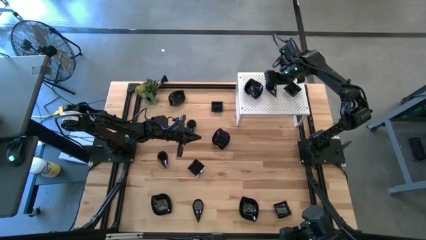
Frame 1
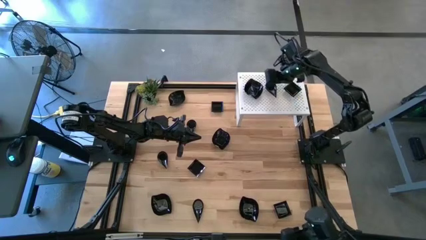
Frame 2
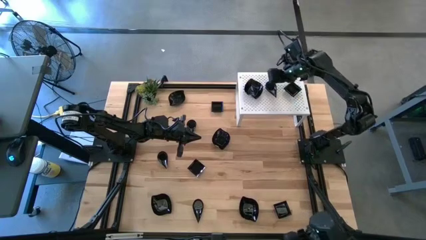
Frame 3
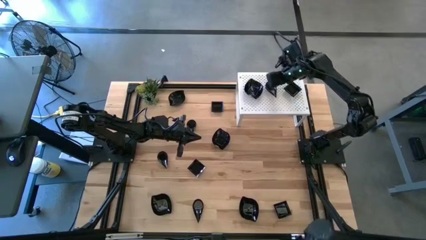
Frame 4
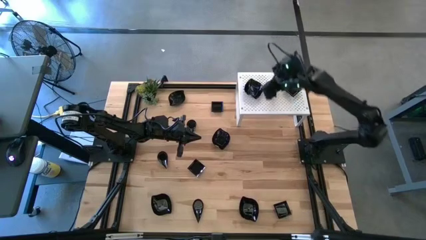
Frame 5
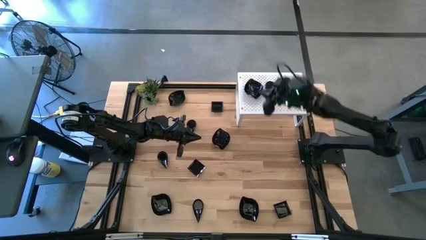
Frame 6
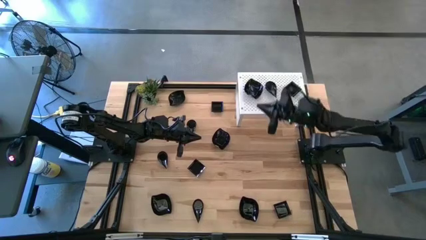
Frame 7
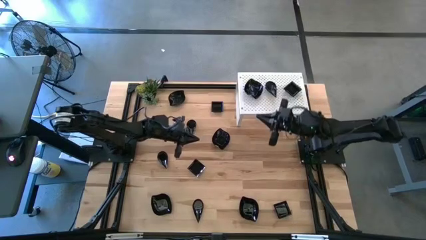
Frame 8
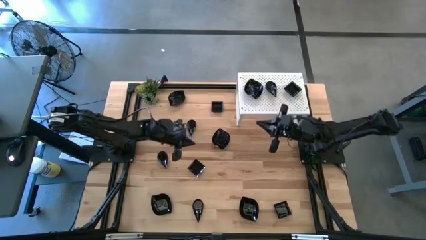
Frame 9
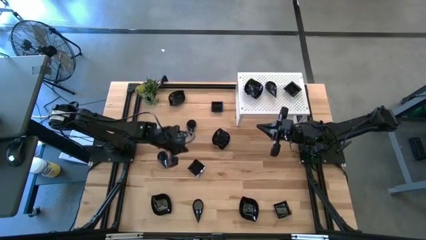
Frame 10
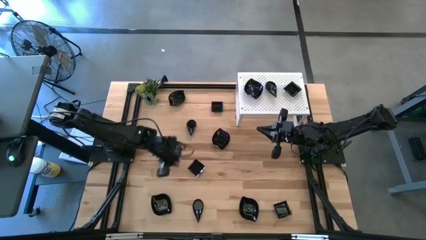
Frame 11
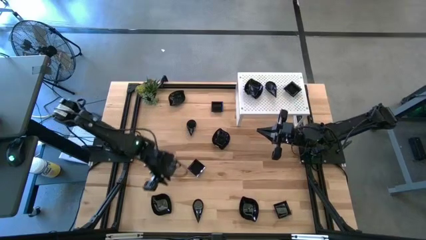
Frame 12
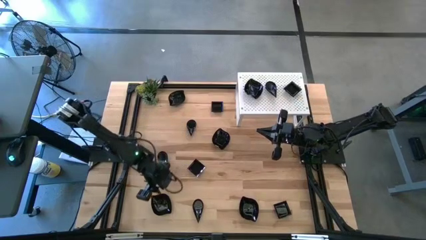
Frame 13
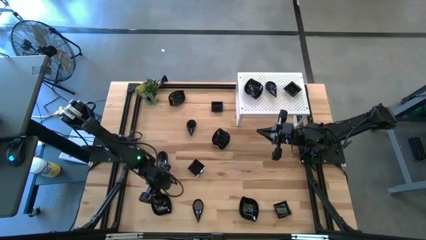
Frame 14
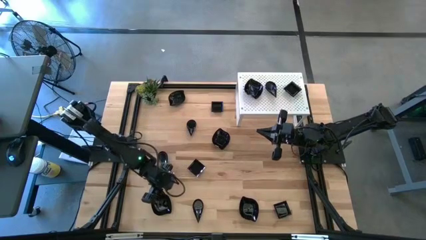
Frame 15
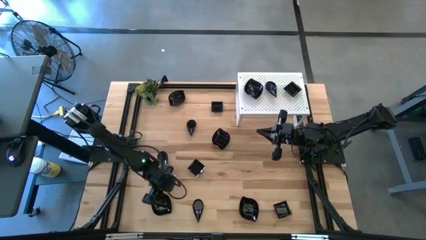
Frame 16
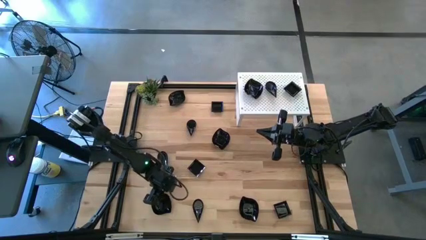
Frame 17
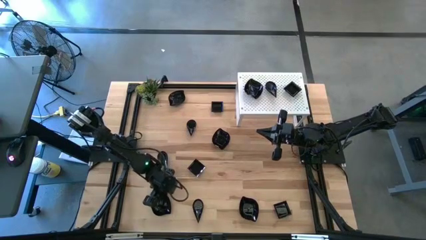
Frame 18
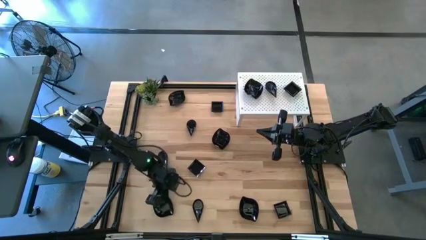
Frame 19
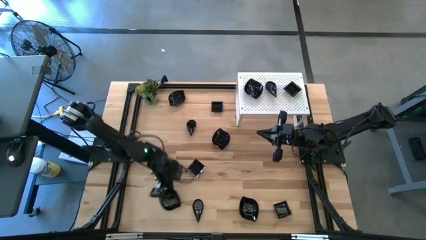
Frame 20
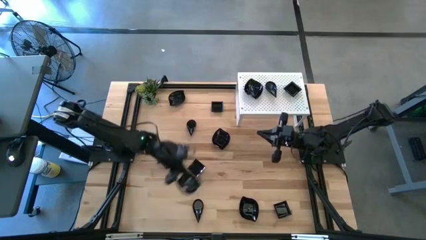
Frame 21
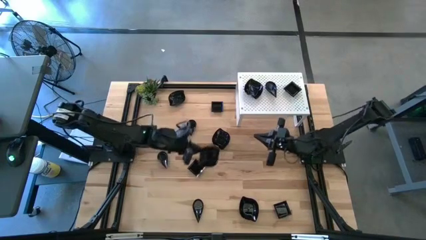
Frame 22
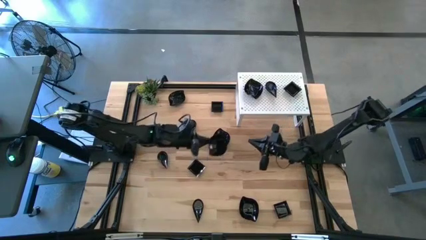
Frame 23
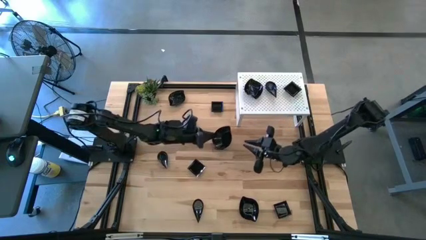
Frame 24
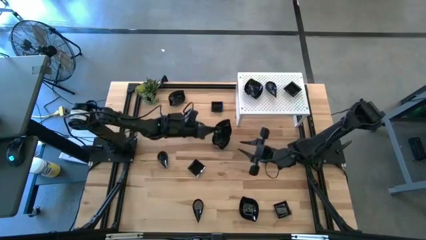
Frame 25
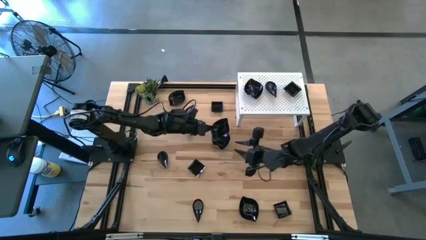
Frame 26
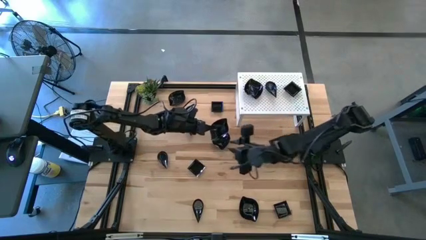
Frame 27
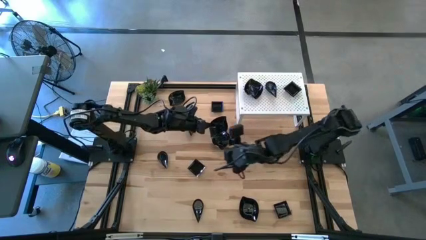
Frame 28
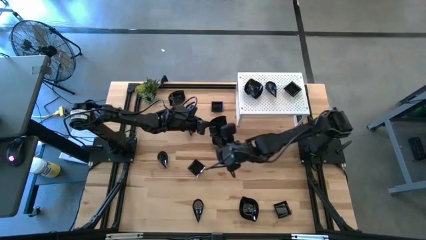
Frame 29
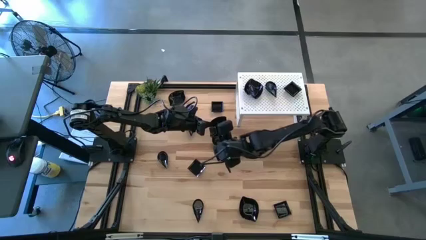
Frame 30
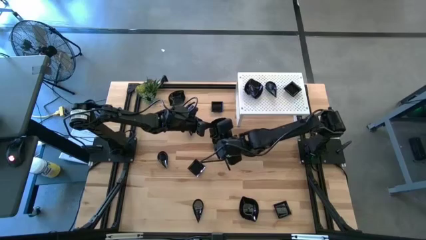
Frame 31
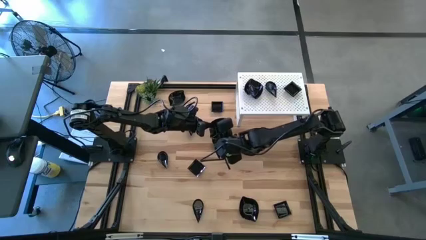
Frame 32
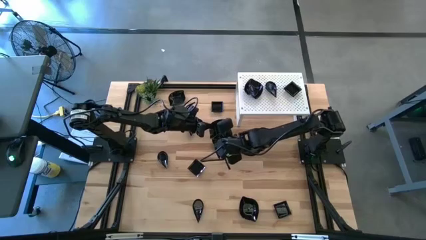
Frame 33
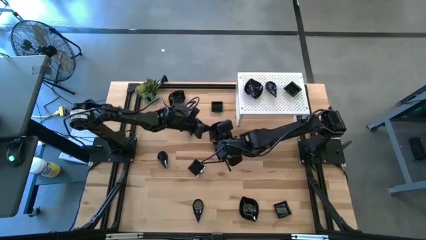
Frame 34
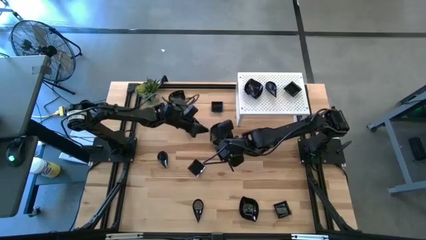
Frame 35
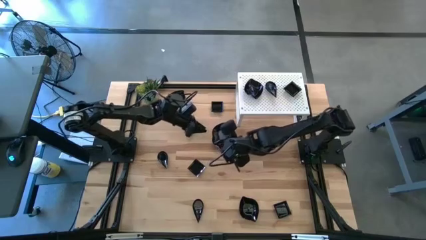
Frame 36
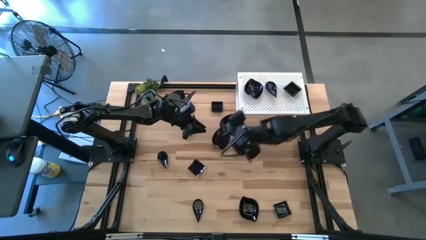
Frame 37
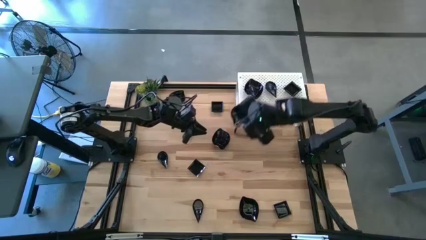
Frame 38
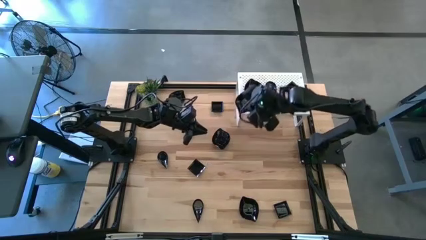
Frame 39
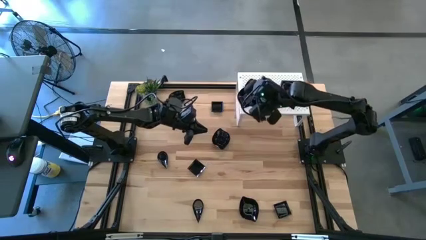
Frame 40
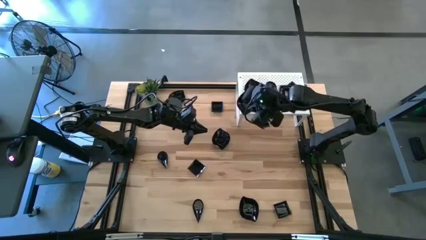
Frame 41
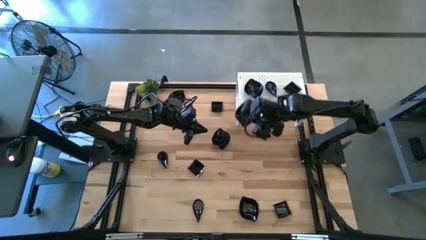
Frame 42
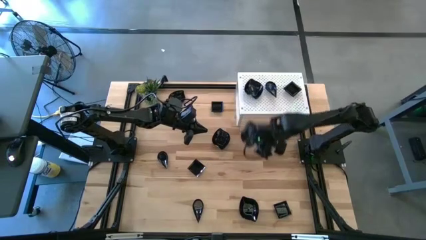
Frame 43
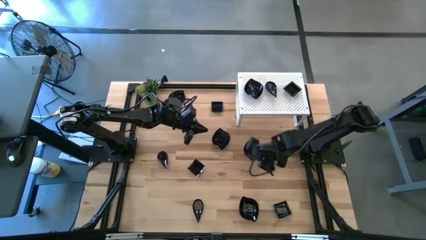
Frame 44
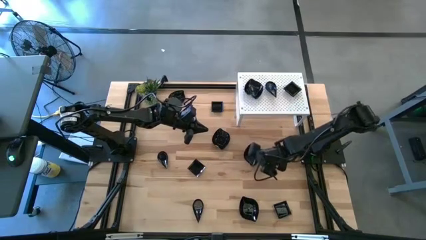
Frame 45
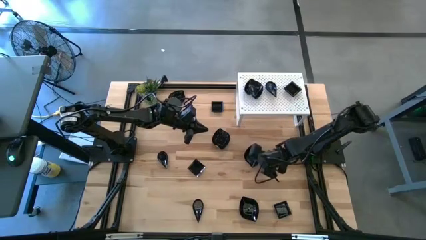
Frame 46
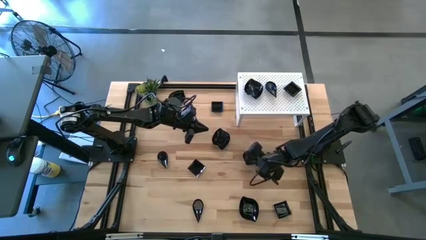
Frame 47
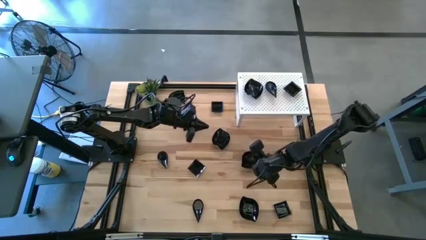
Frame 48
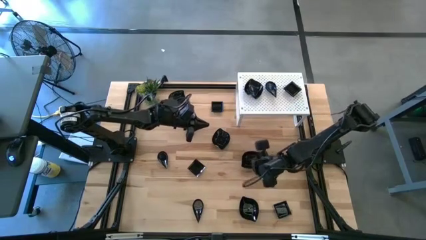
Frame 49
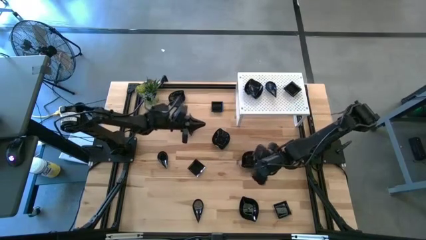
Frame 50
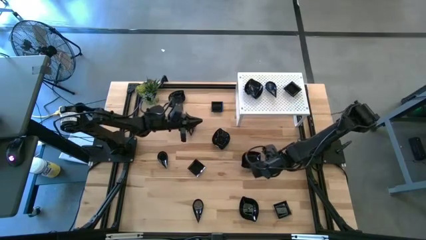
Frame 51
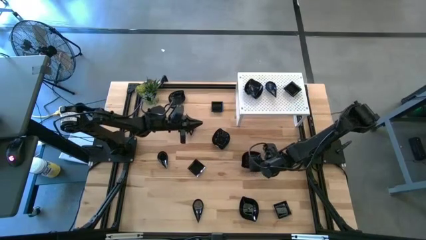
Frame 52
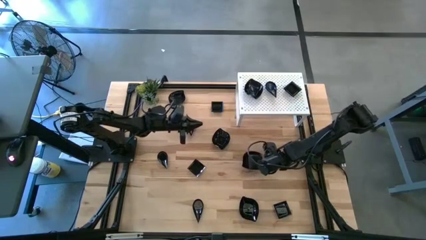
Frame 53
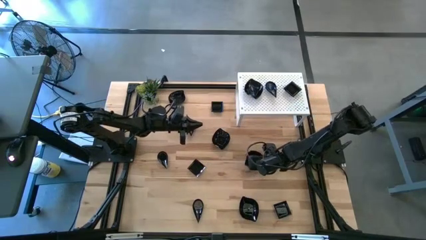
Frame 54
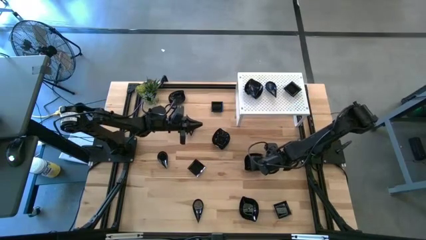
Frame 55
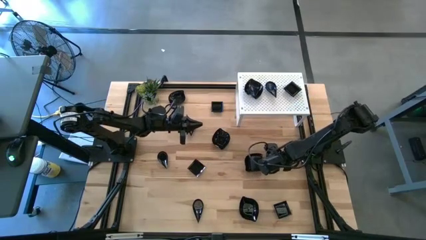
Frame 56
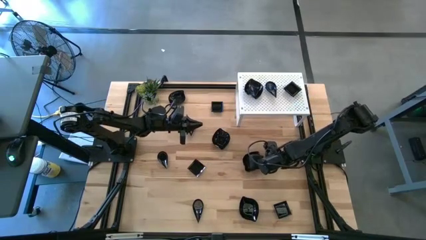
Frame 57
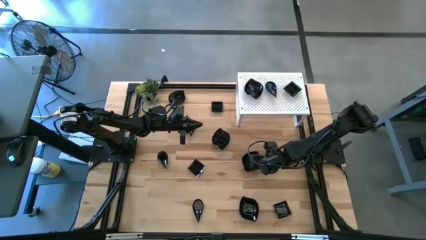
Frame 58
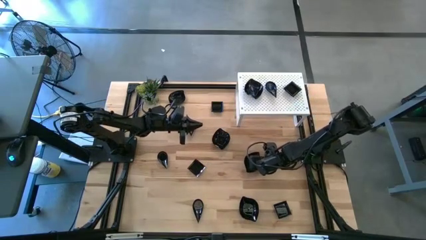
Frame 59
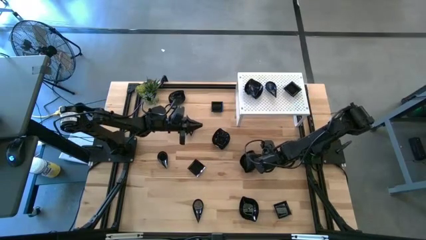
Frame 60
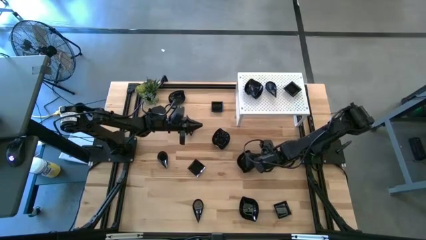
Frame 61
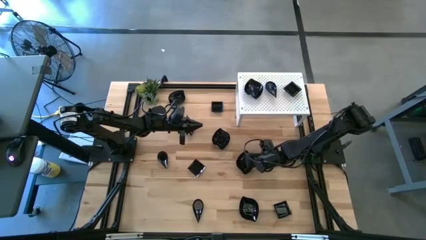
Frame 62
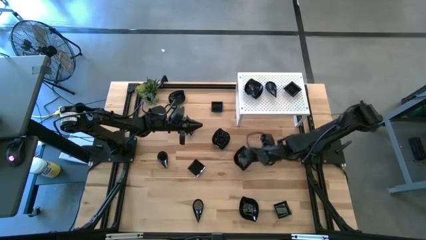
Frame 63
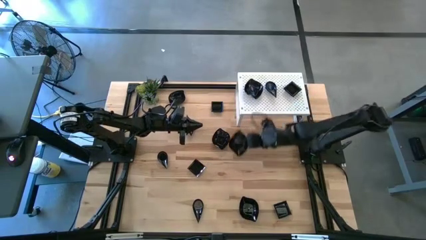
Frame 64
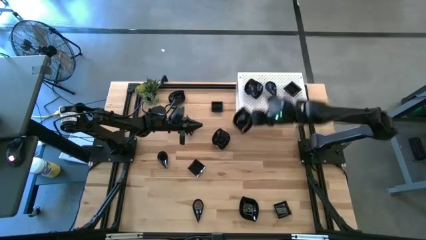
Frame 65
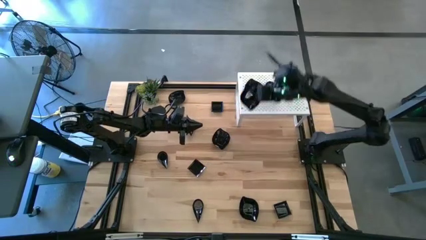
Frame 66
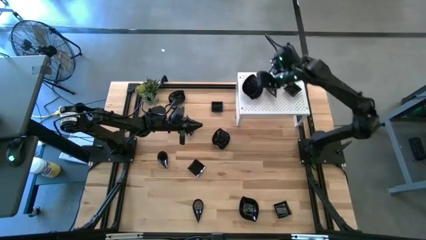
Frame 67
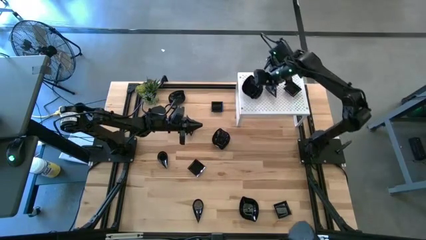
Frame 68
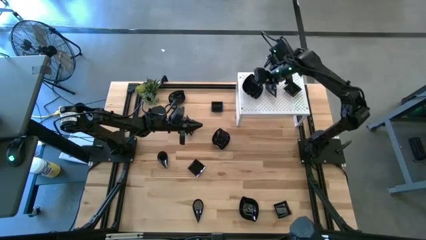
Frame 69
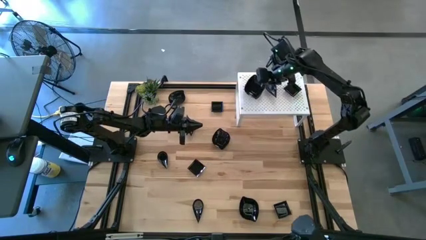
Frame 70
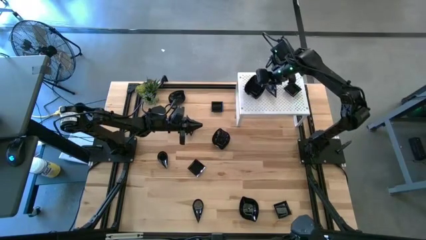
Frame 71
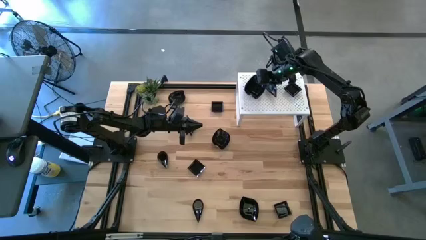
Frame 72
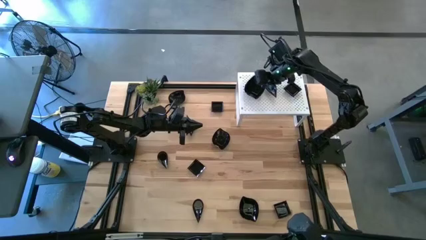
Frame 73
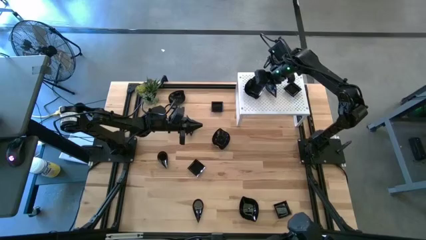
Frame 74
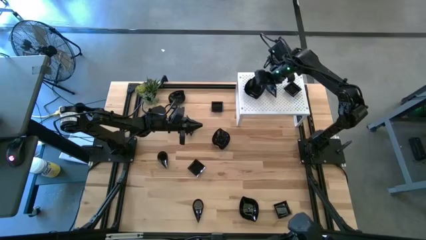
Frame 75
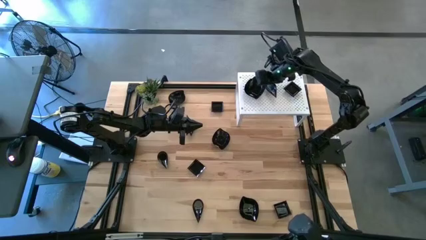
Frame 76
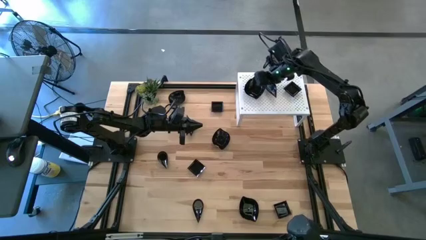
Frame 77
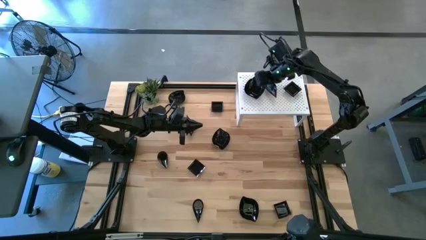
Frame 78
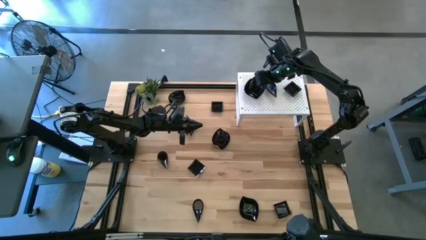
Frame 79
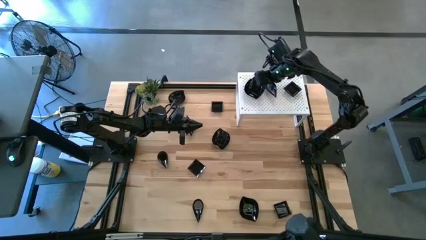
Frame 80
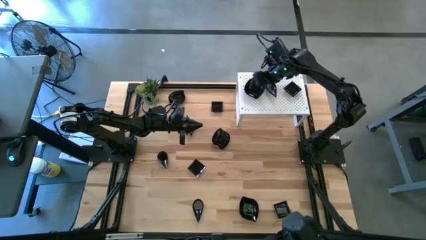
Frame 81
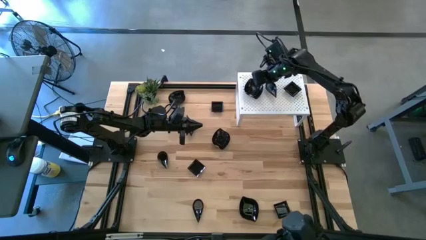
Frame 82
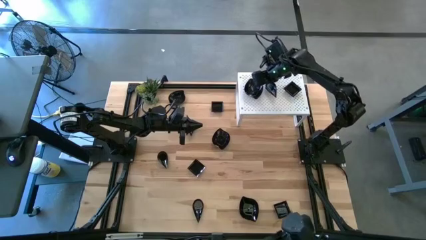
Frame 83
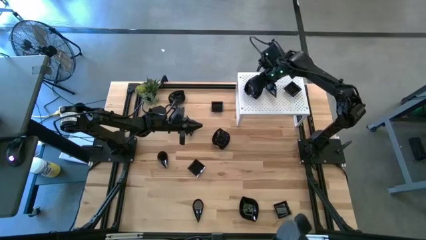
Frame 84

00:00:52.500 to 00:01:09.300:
Task: Pick & Place Mini shaped plates
Stack the black leaf-shaped plate on top of the black leaf-shaped plate on the shelf
